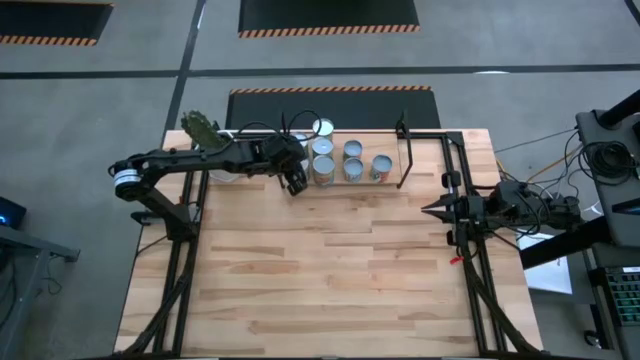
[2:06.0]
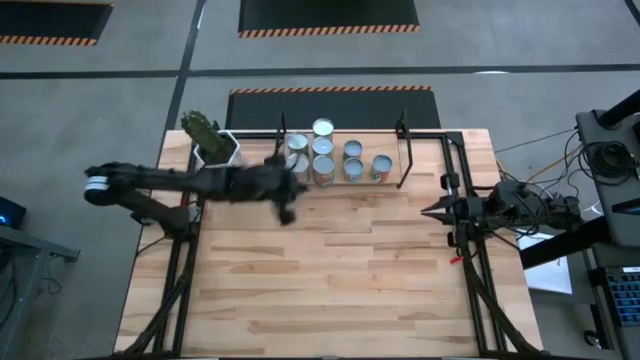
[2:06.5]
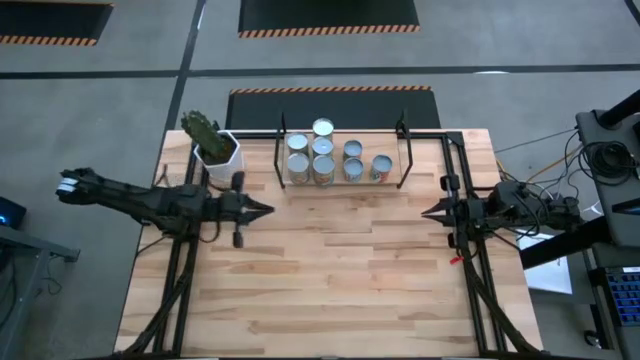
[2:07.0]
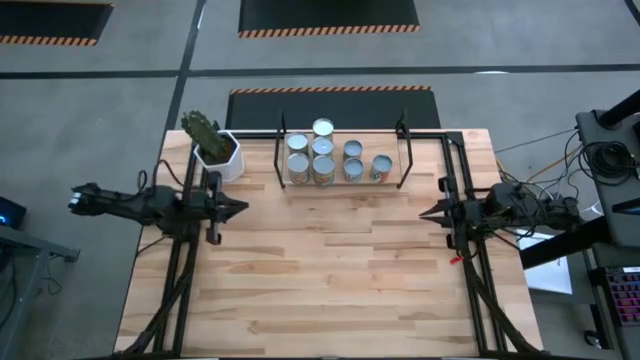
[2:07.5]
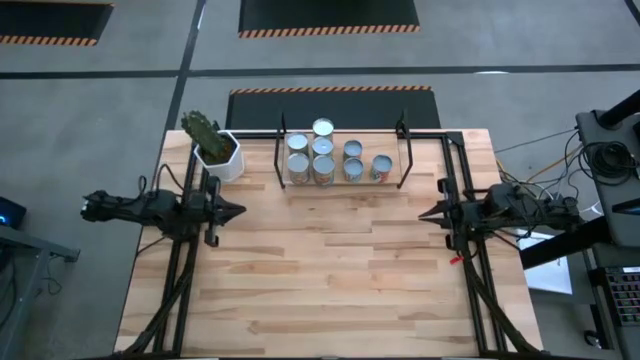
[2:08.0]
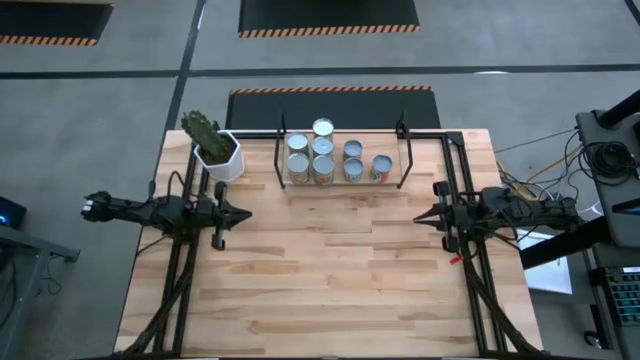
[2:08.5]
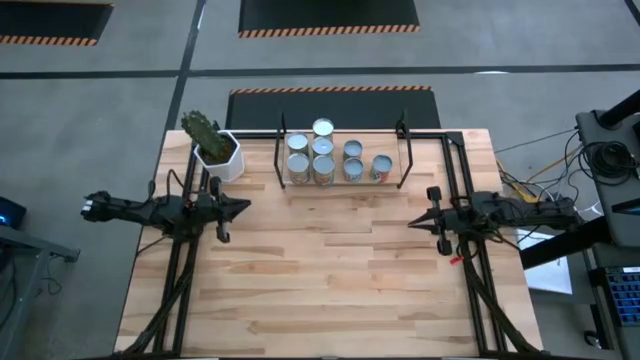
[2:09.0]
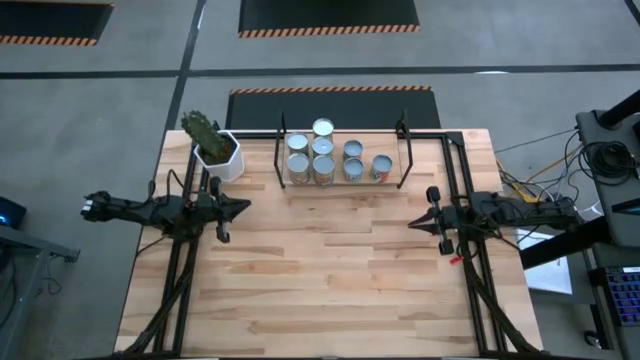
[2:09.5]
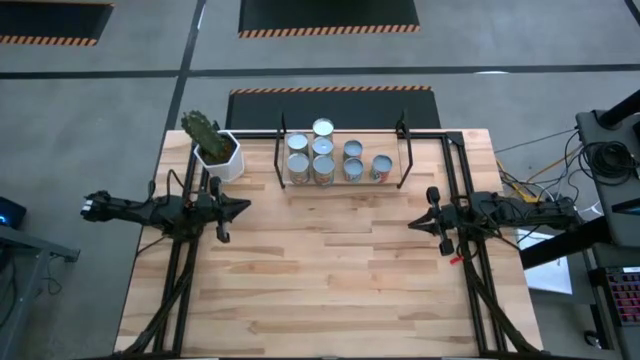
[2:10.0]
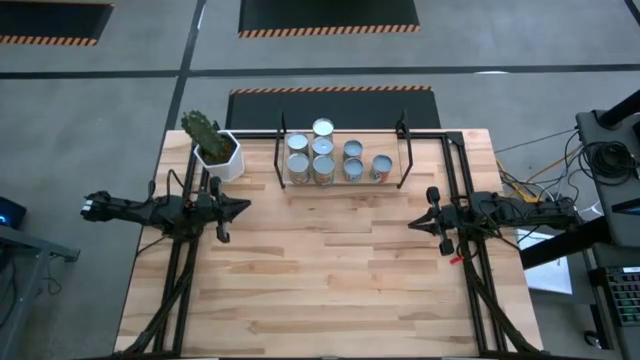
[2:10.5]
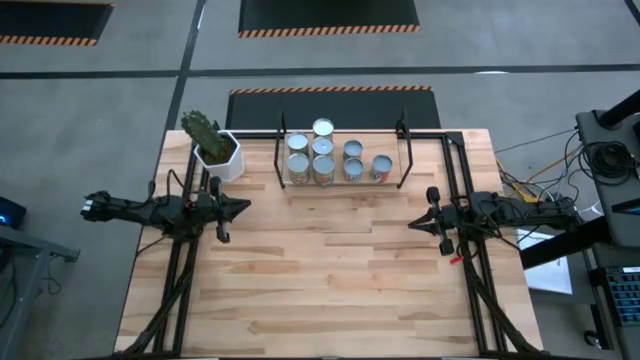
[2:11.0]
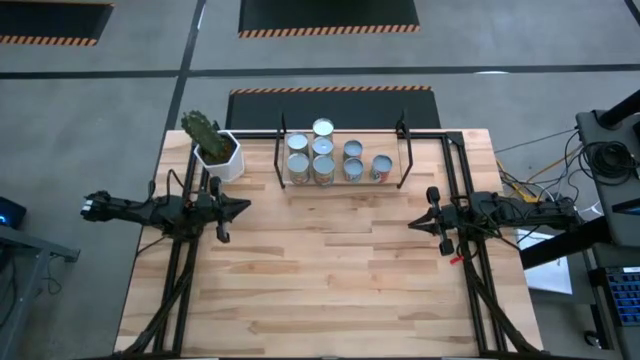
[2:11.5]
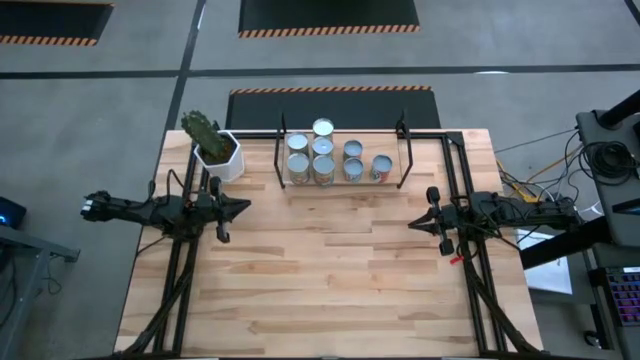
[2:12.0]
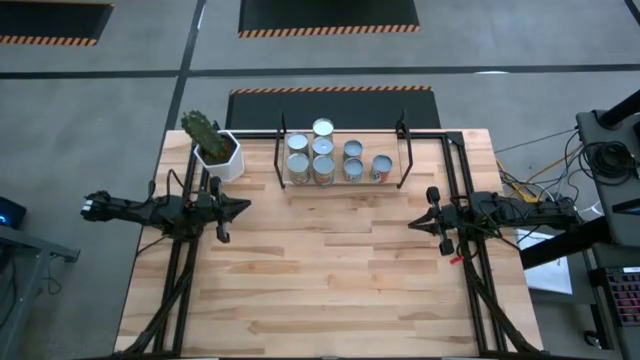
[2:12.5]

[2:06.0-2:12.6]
Task: Pick and place cans onto a shelf
Return to Home Position

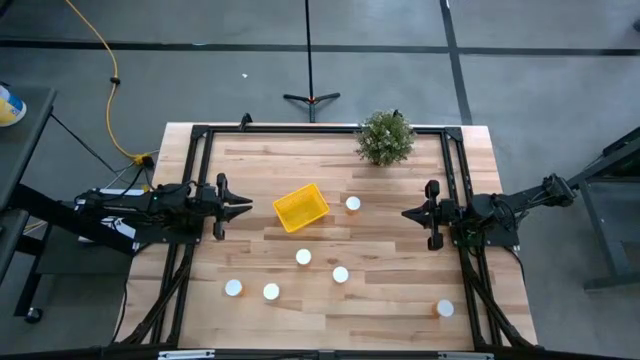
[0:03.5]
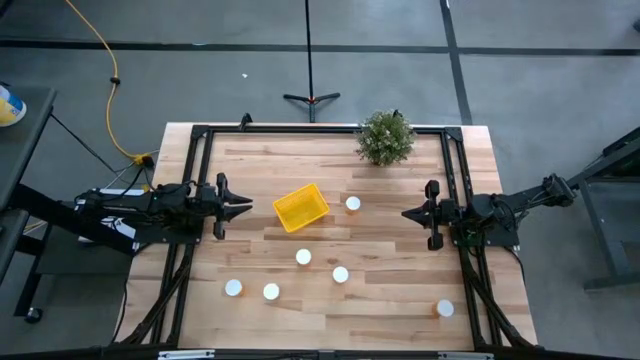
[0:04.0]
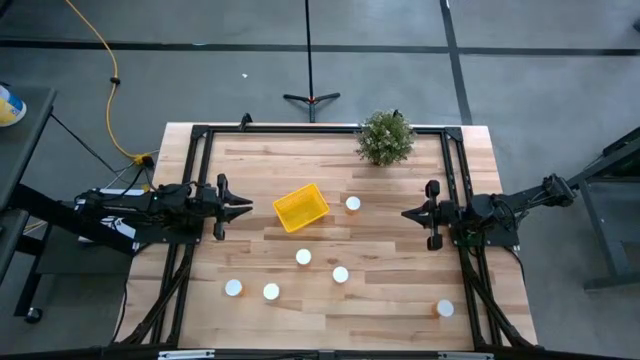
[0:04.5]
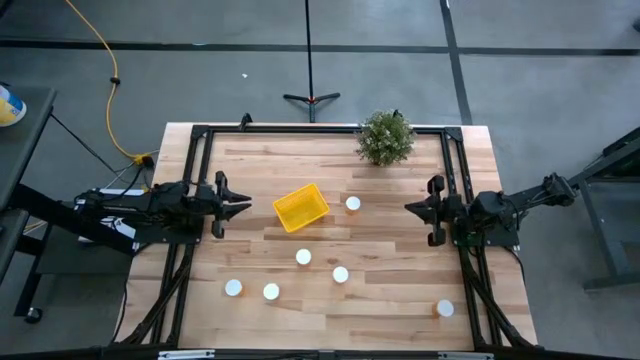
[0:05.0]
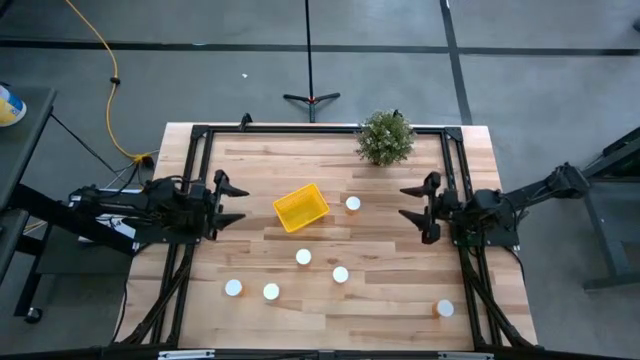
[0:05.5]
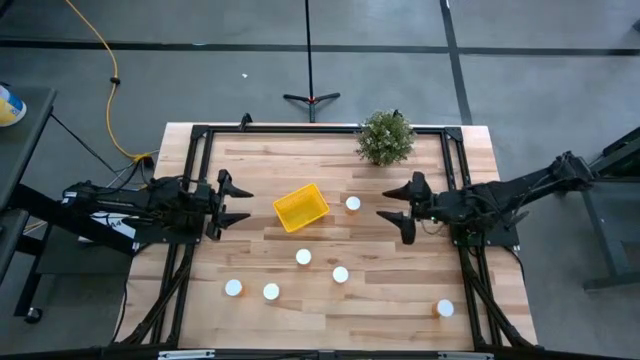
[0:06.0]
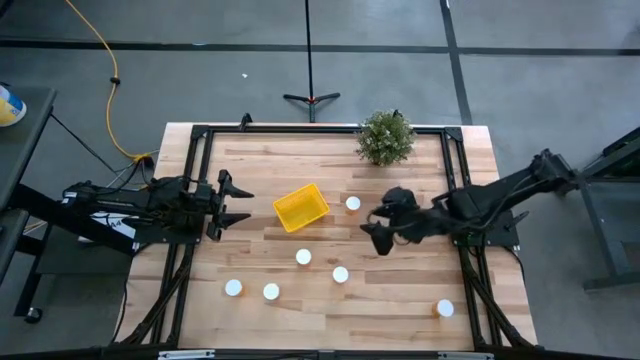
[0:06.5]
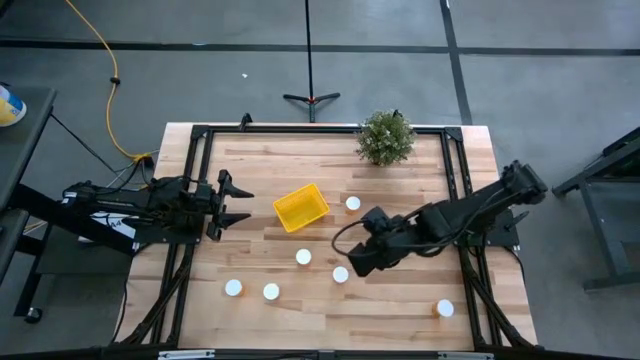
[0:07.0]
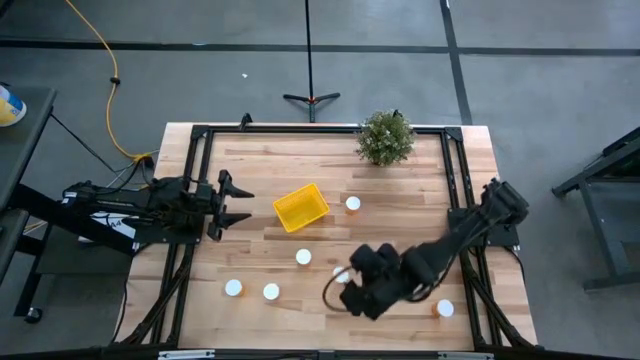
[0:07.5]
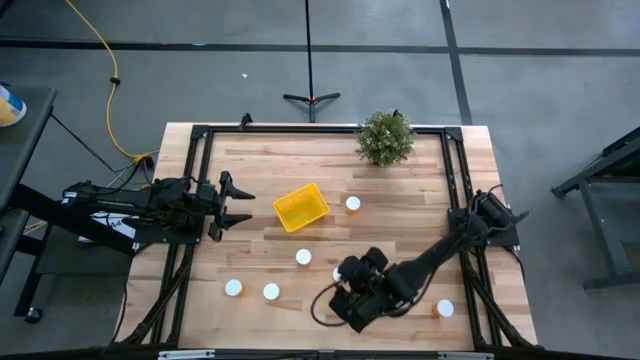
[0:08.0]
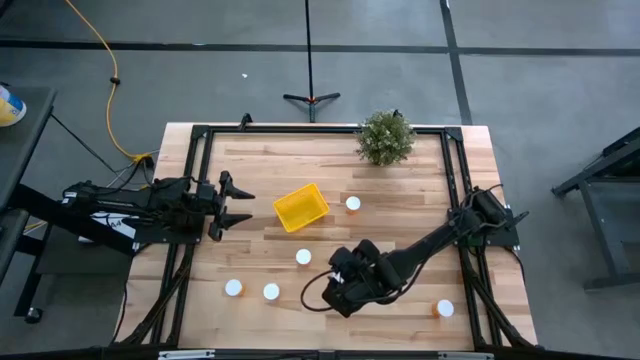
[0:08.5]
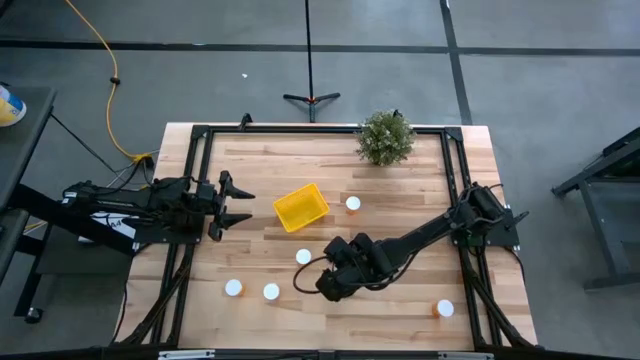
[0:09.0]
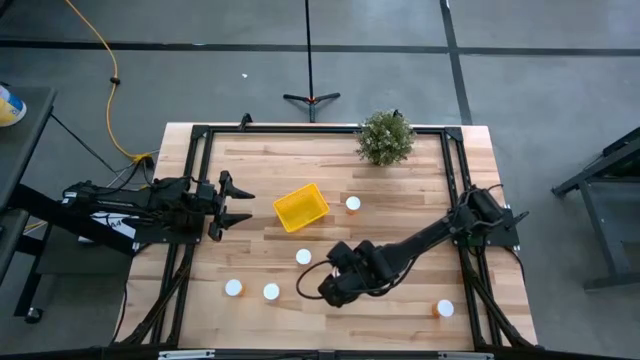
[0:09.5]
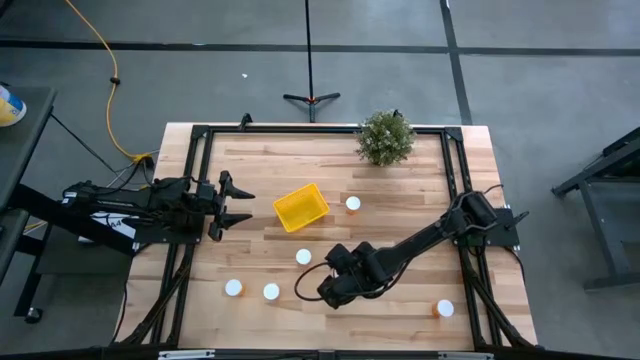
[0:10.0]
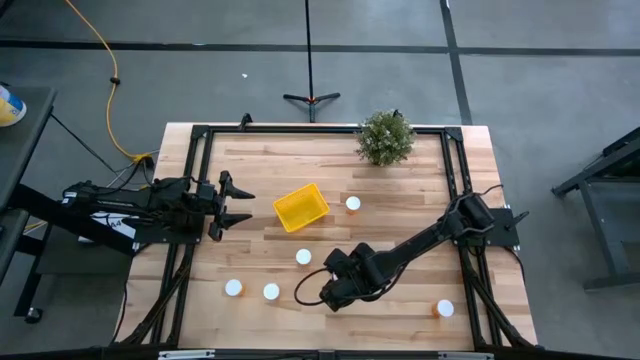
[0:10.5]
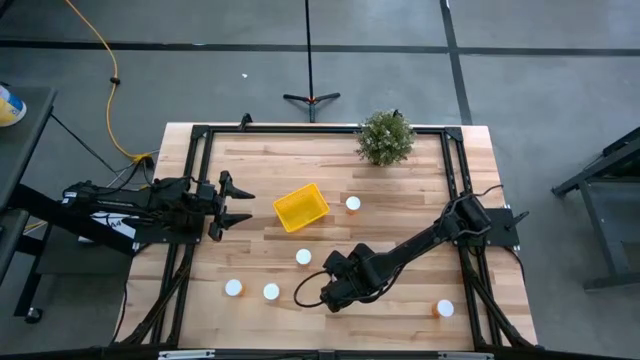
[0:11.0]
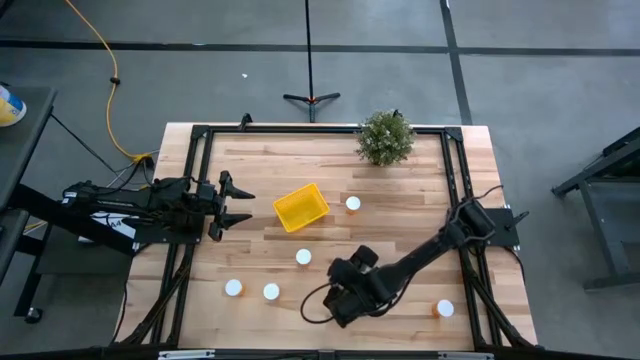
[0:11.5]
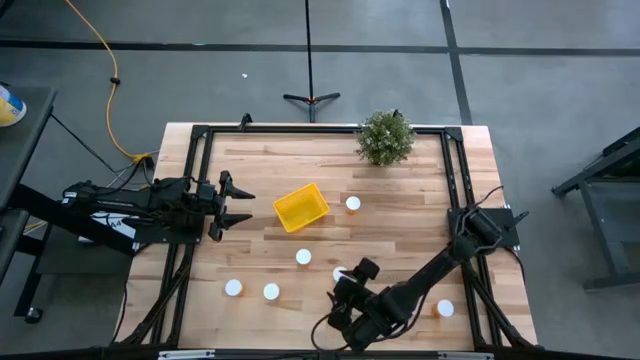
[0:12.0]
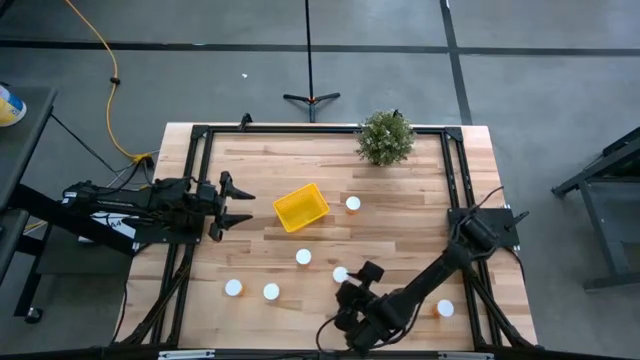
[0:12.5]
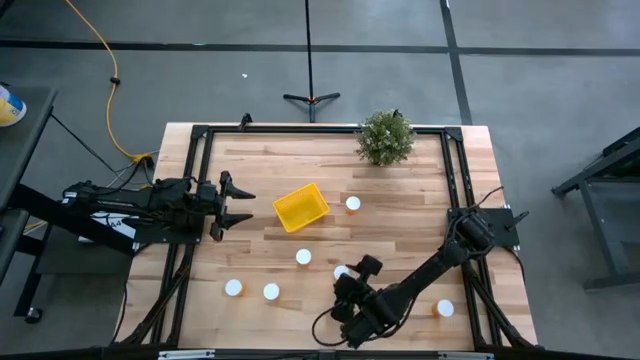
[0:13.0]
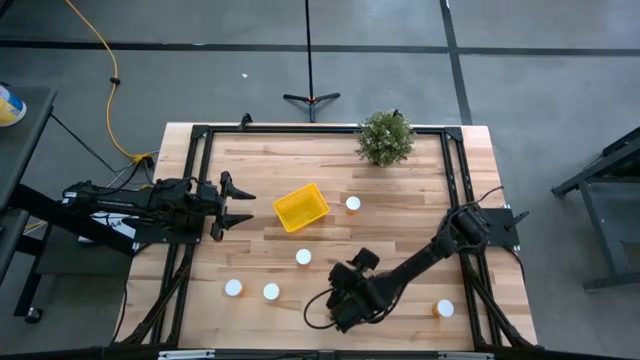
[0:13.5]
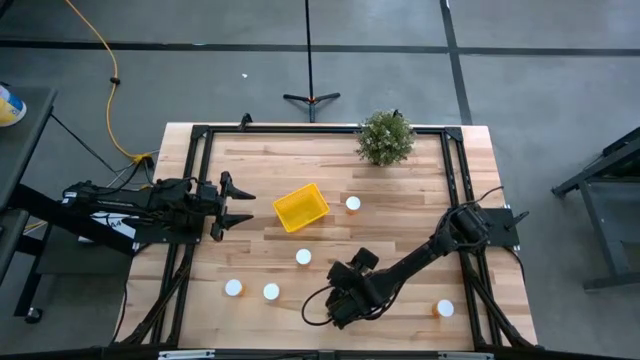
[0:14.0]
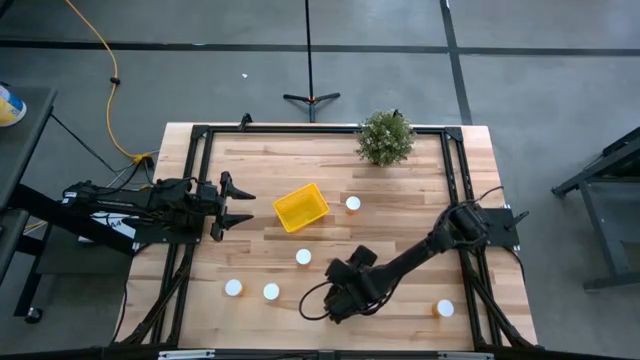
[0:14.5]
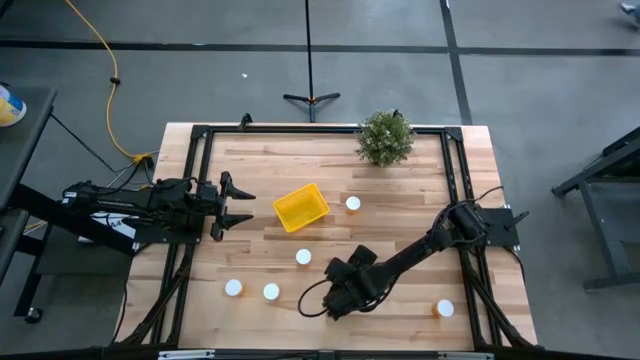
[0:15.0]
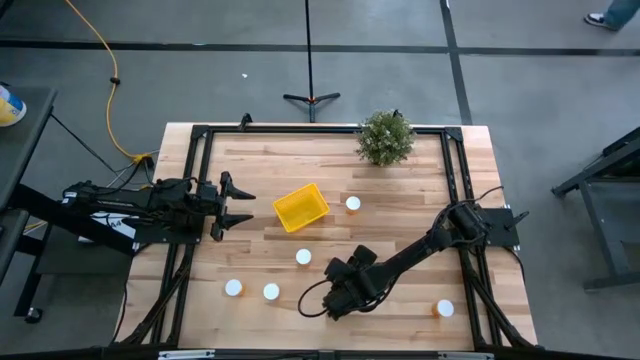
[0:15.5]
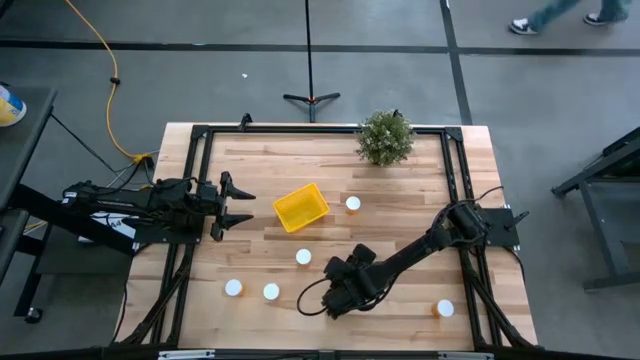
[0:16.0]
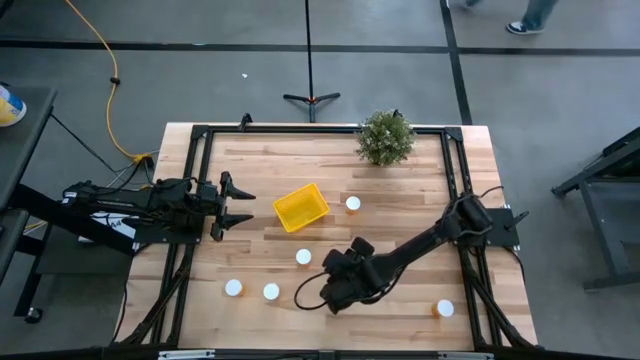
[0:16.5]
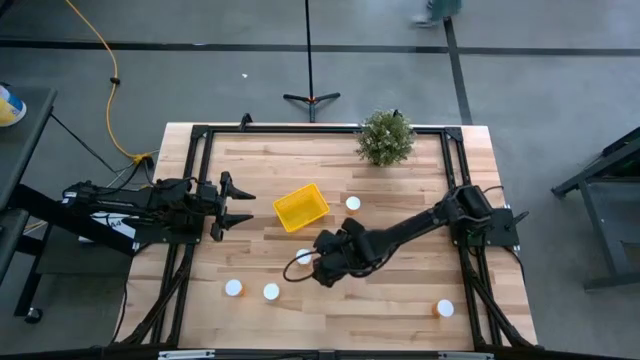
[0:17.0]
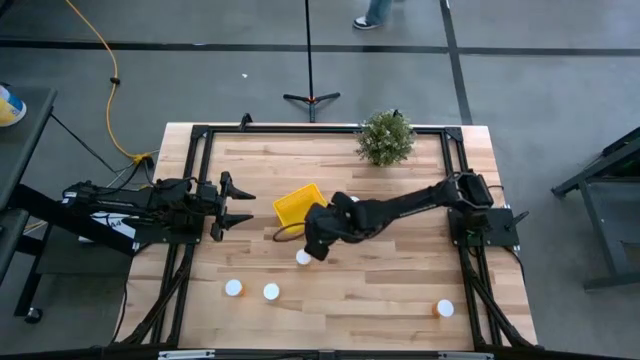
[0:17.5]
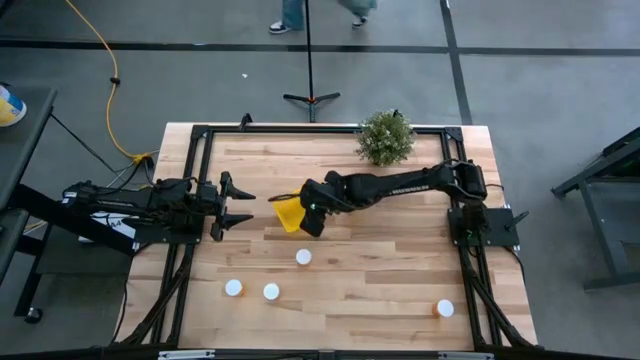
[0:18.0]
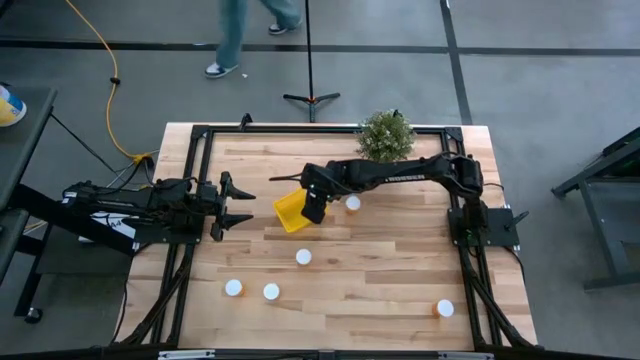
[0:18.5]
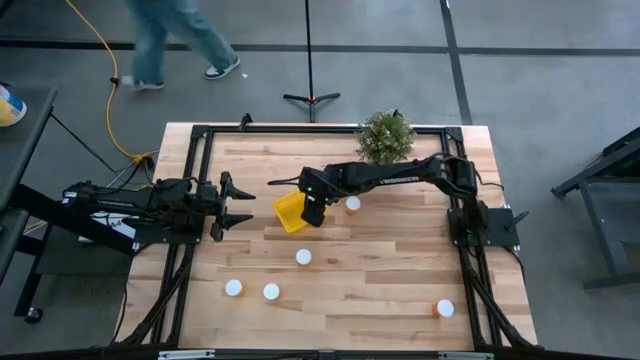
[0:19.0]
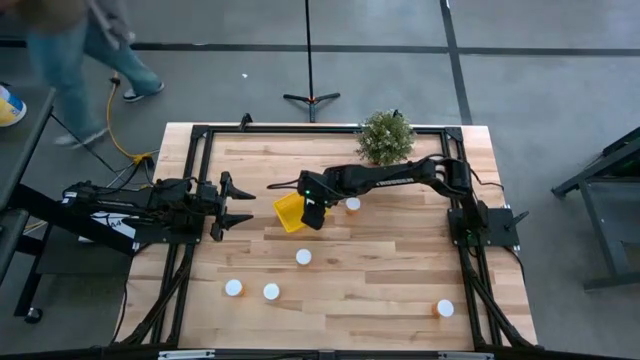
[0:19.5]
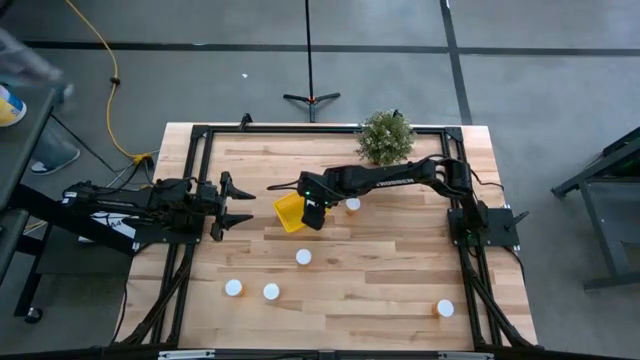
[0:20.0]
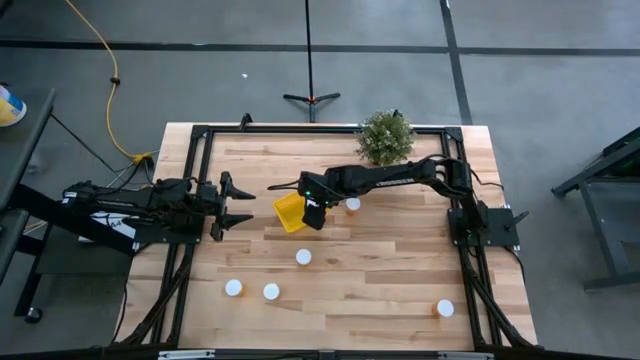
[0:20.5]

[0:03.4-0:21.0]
Task: Pick and place pill bottles into a basket
Put the yellow pill bottle into the bin
